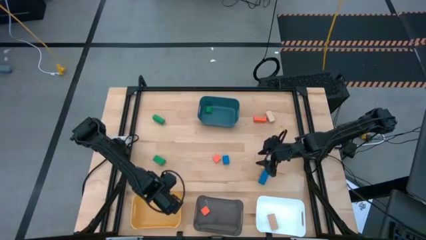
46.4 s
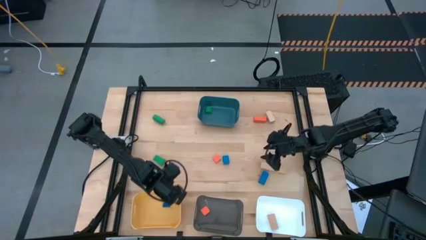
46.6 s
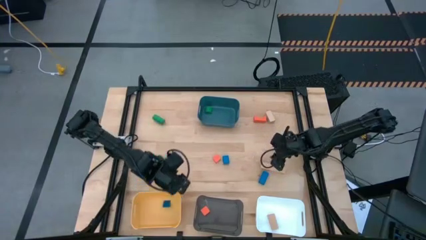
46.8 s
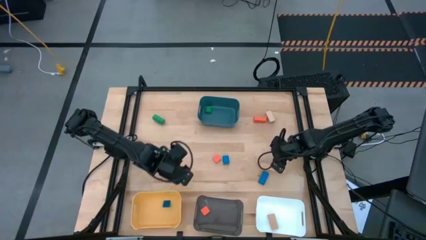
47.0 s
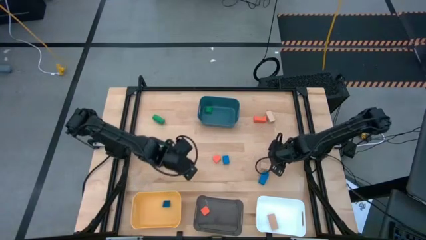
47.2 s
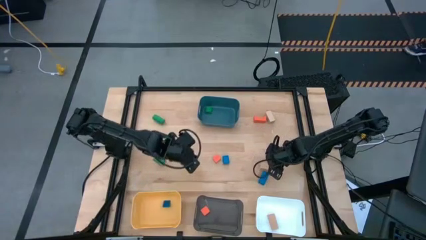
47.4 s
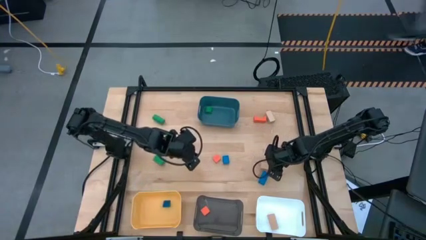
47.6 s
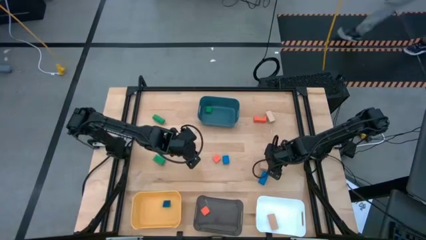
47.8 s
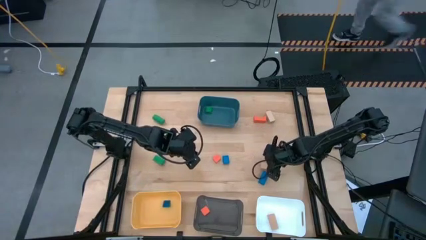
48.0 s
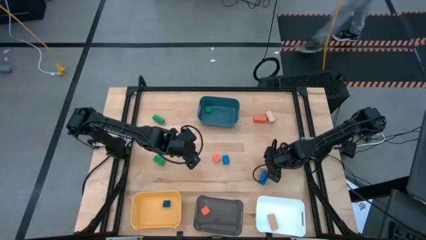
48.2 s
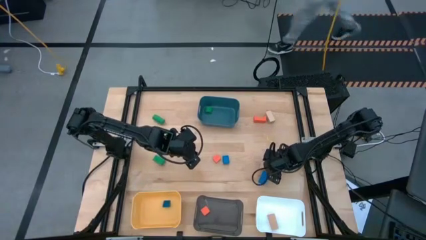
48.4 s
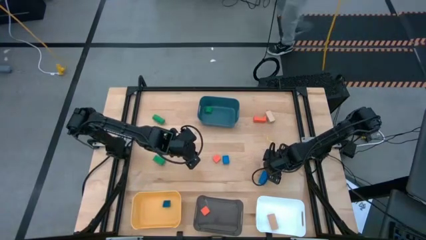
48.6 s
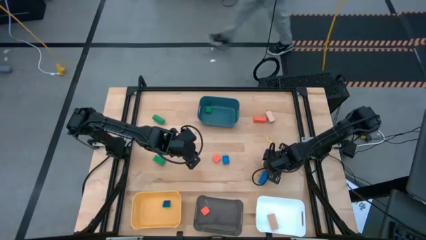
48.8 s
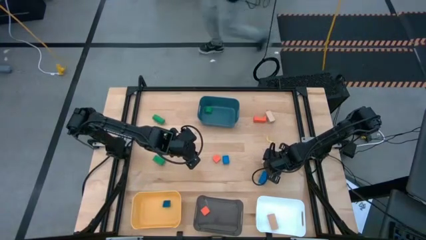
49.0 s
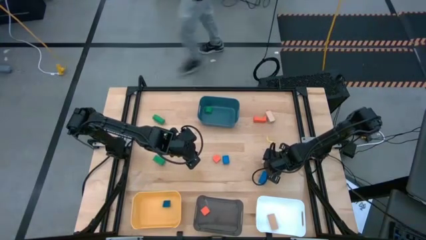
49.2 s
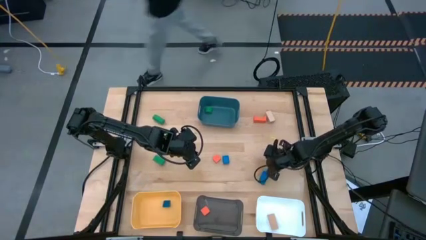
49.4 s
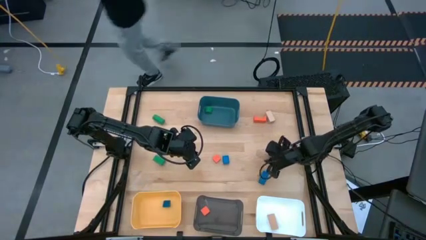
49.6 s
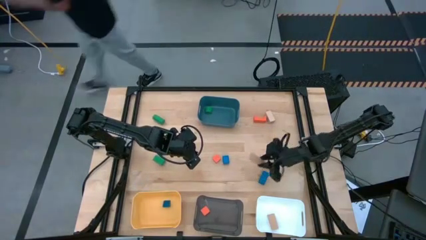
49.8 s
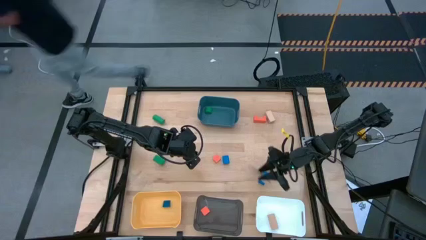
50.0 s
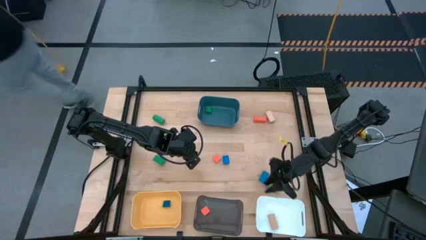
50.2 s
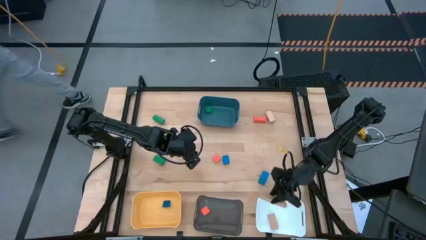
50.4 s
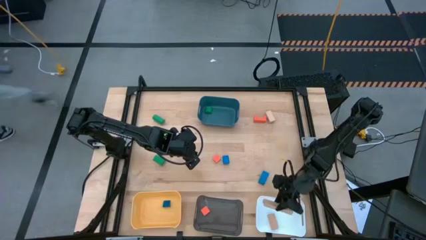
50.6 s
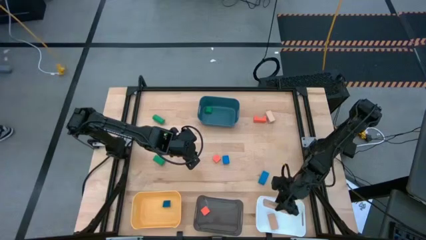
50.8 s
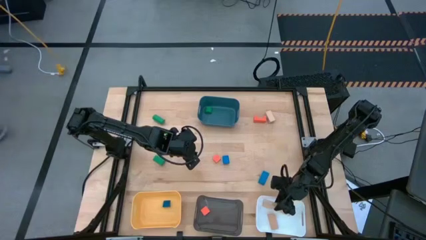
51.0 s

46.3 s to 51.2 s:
Task: Sort & place blocks by color
Put the bottom light brown block into the white bin

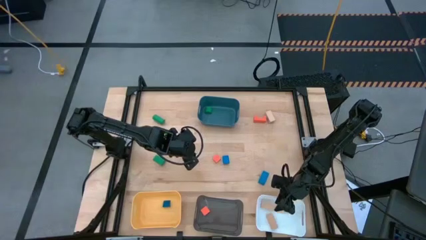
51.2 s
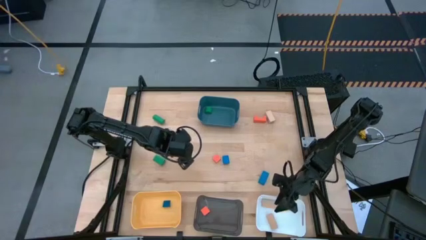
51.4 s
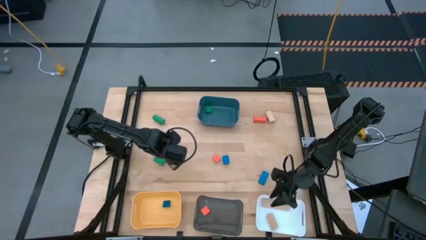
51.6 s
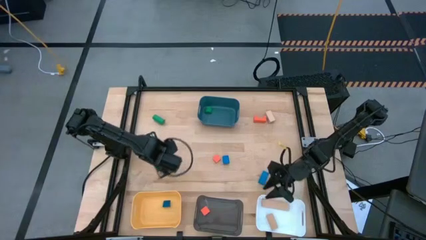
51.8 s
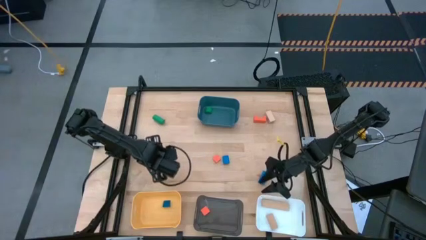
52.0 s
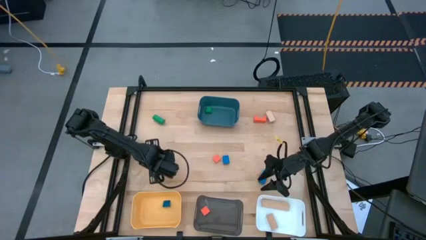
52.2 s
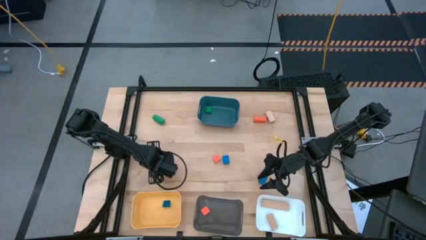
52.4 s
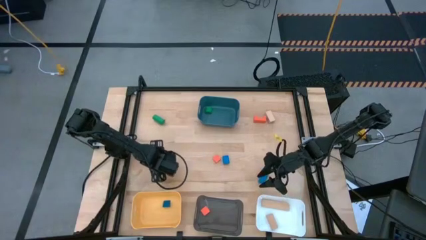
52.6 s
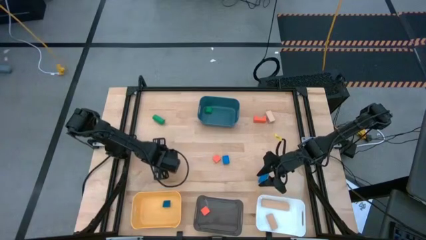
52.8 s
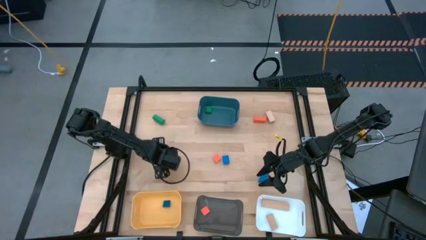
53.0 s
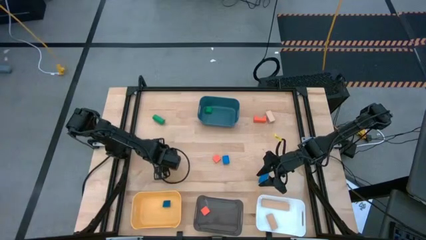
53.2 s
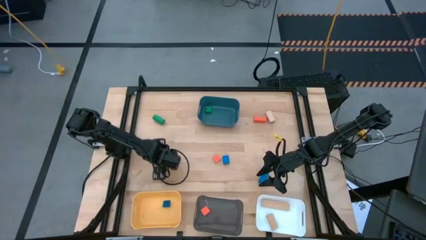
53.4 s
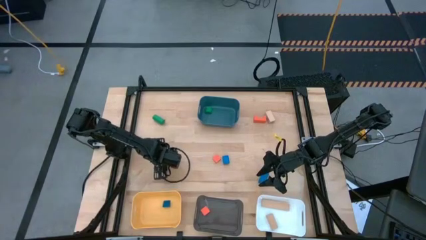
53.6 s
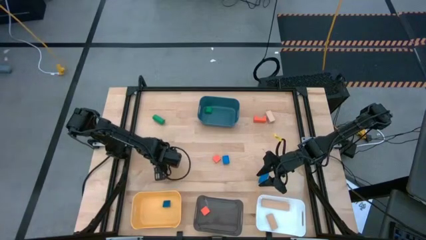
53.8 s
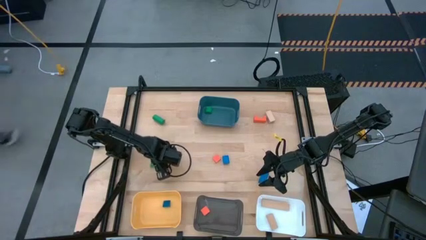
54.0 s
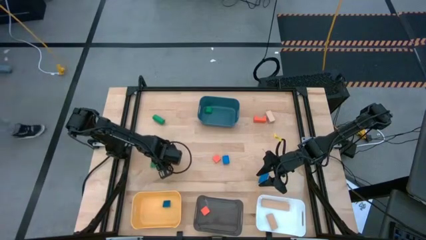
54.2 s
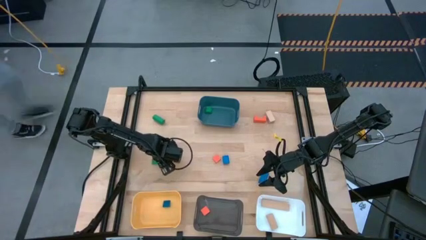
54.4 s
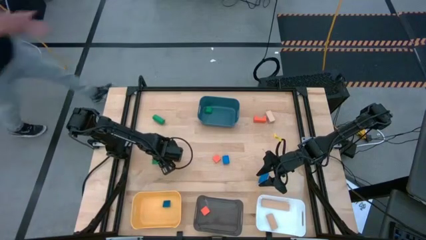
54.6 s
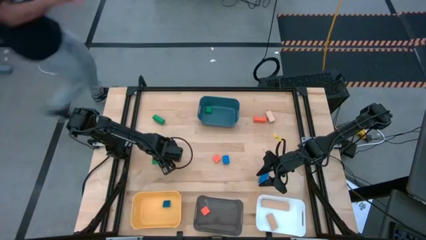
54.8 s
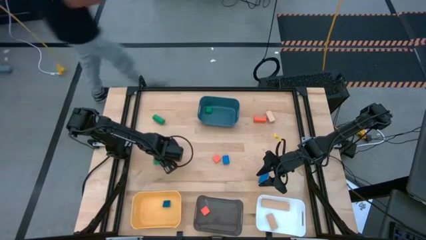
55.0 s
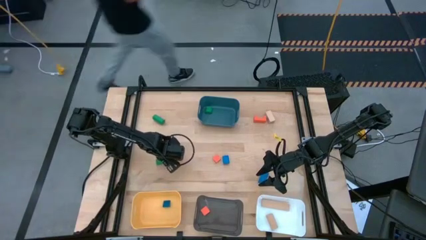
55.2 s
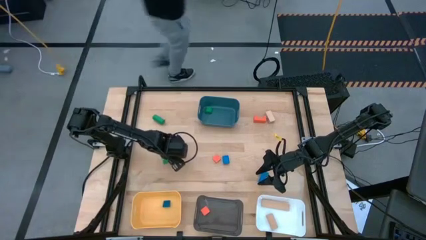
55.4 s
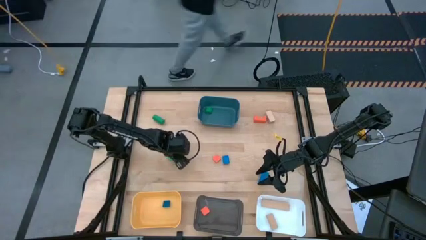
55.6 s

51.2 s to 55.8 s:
Put the bottom green block into the blue bin

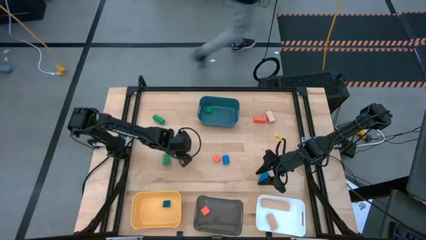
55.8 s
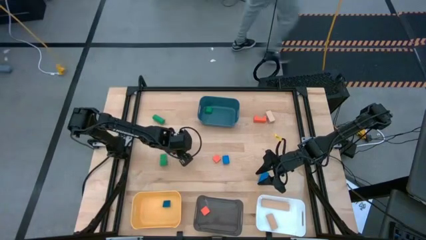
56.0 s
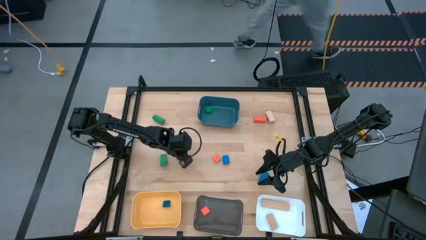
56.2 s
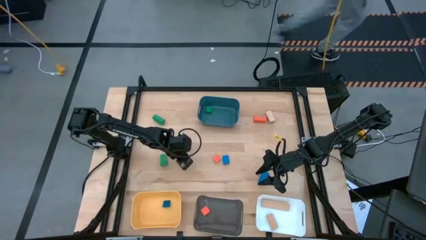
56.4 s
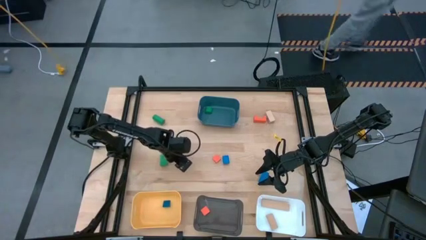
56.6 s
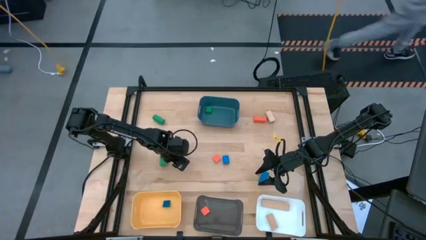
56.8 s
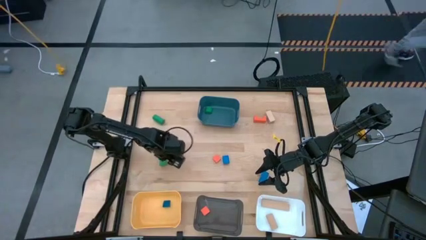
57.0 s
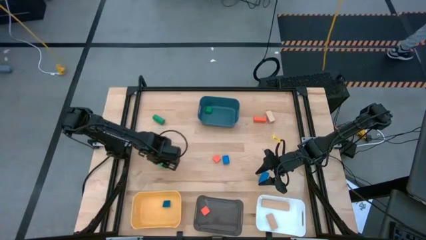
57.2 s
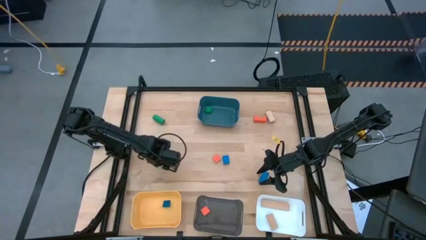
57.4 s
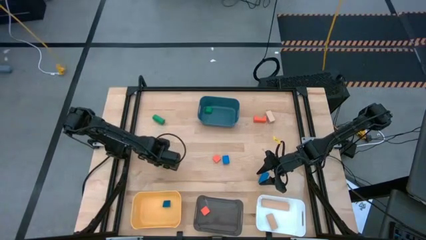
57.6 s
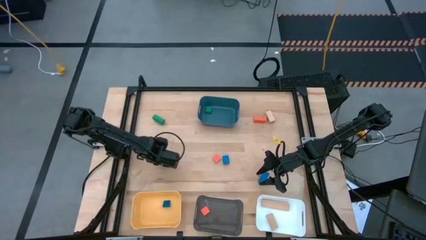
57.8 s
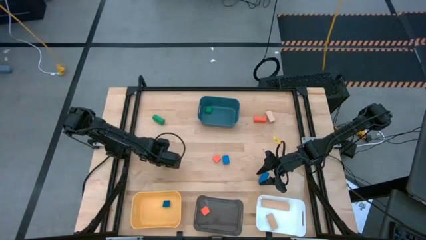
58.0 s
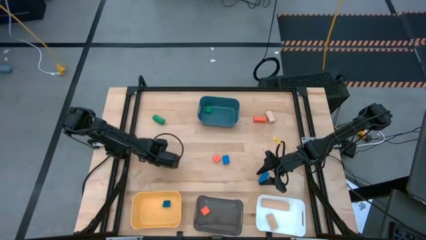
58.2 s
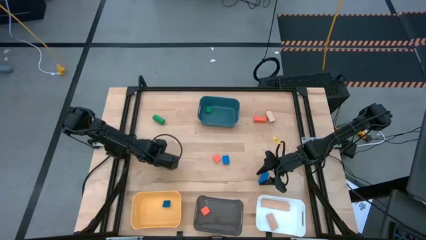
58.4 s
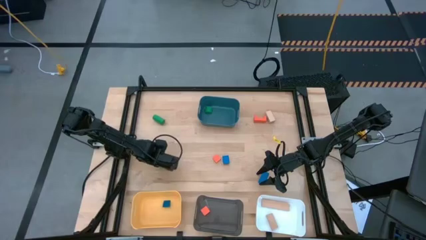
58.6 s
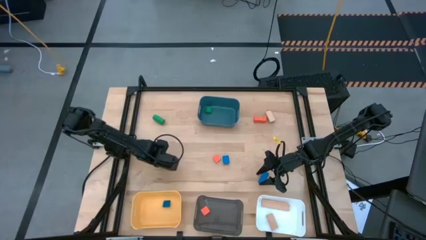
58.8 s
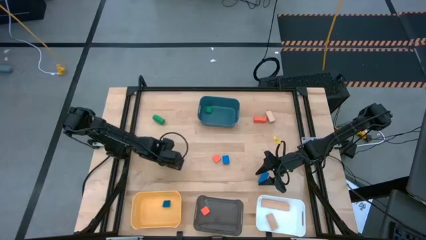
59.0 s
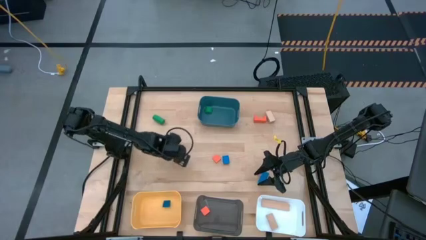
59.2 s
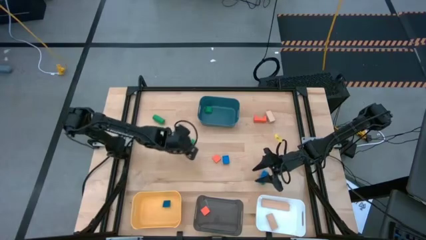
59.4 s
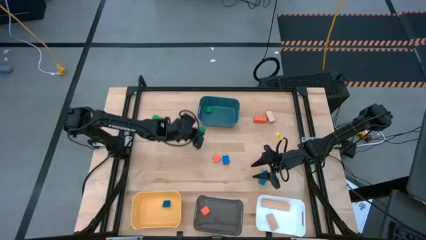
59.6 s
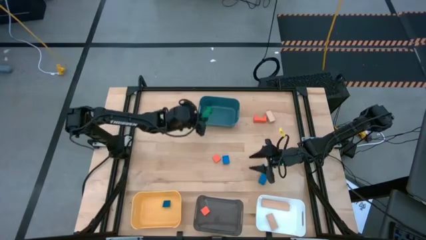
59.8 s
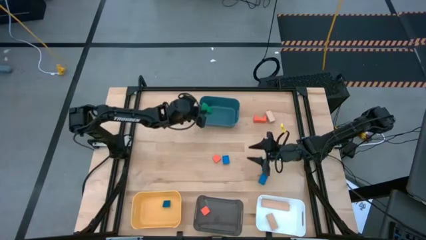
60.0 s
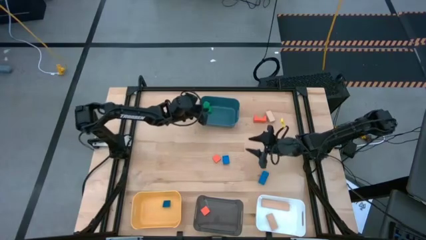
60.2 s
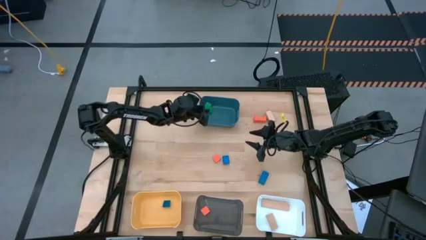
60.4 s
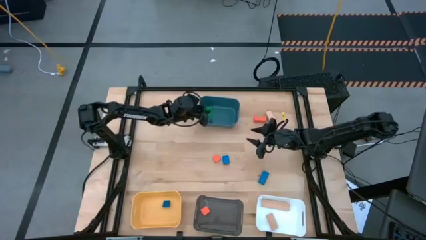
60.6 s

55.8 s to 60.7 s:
Put the bottom green block into the blue bin

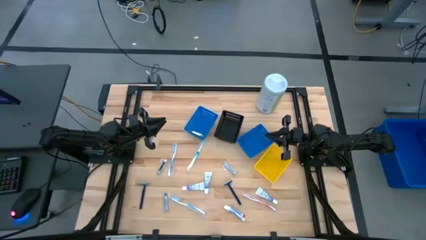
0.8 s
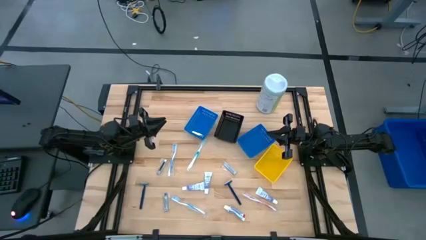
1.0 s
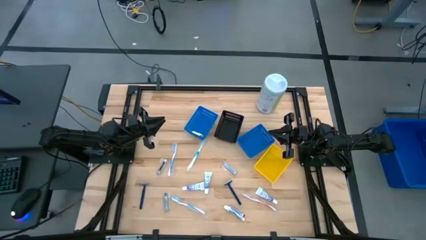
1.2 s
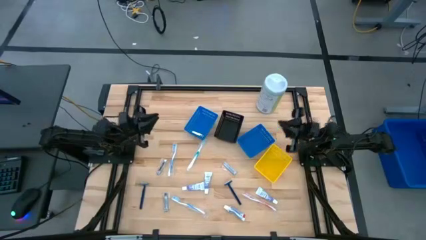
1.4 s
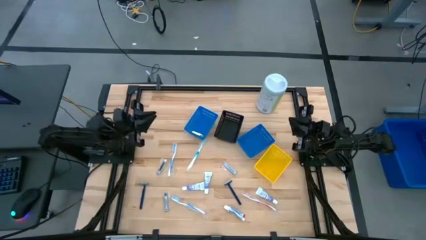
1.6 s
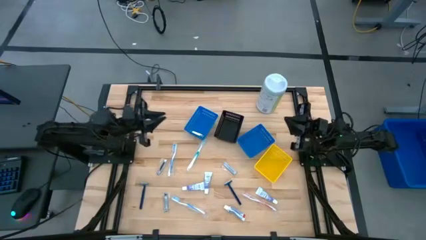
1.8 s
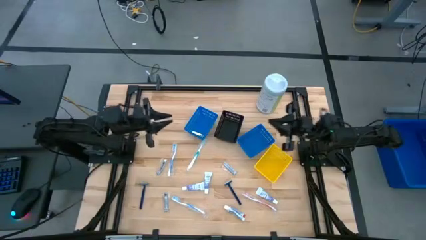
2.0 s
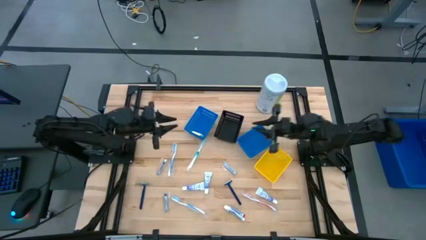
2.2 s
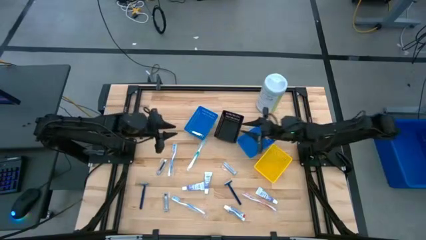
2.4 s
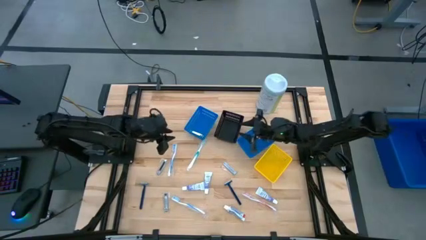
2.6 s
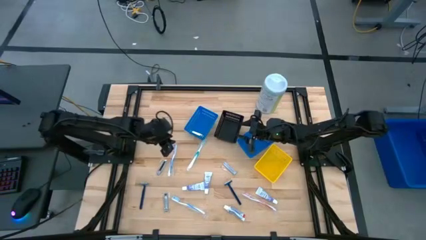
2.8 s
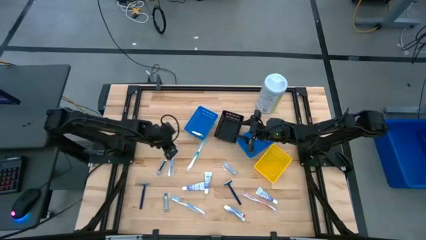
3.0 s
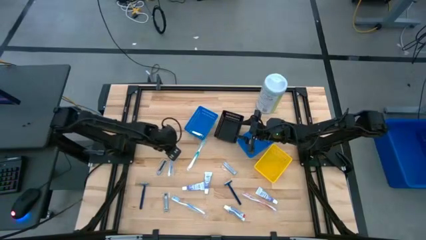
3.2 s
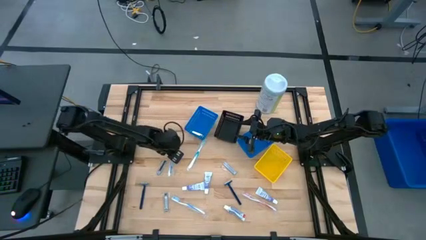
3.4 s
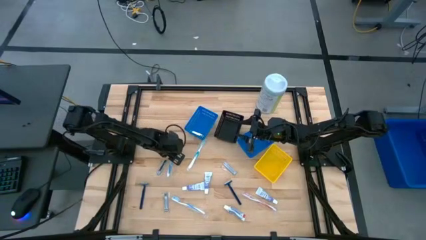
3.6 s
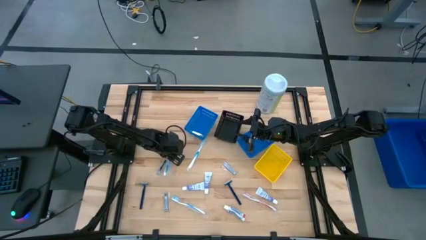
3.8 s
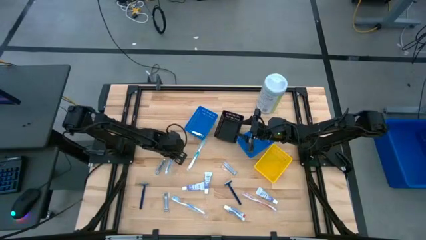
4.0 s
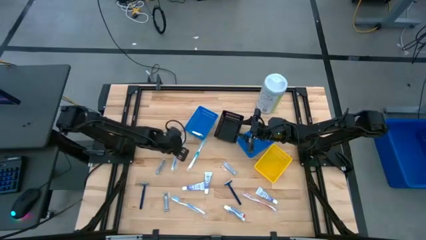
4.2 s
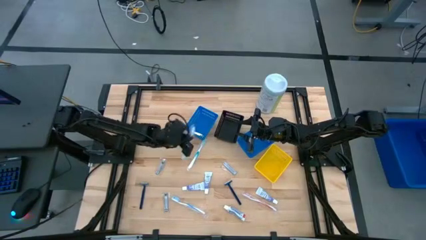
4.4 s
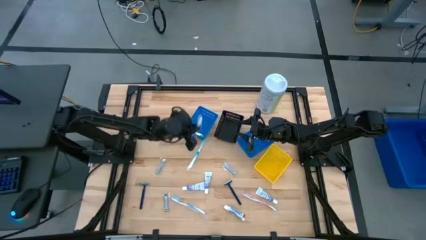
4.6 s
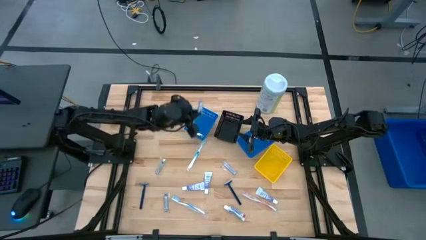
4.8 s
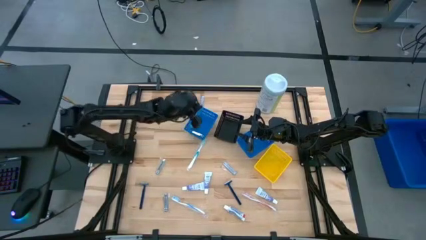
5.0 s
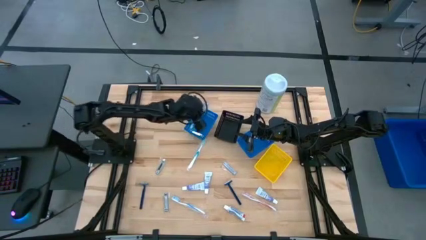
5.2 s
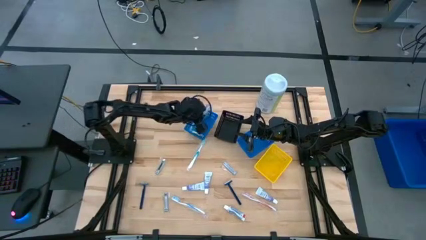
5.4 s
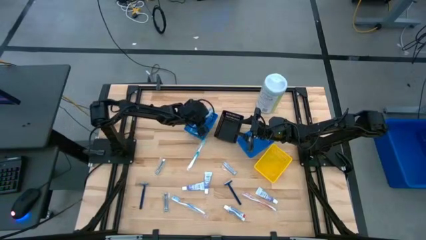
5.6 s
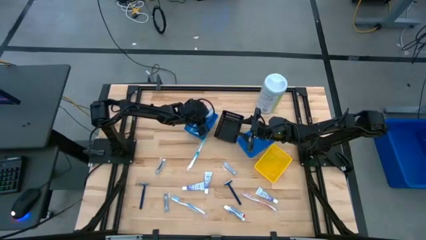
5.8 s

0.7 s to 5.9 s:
Task: Pick & Place Travel size toiletries
Put the top left blue toothbrush into the left blue basket
